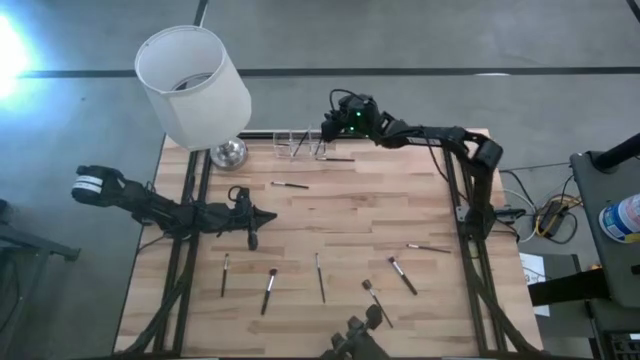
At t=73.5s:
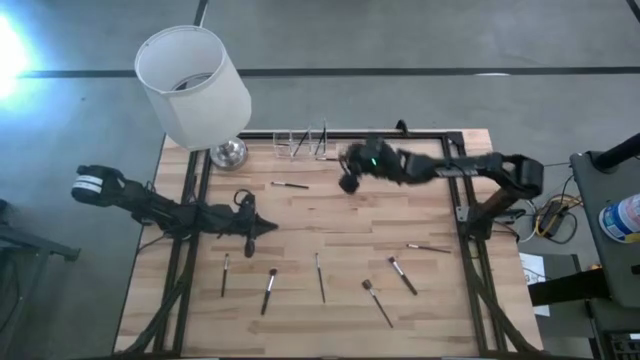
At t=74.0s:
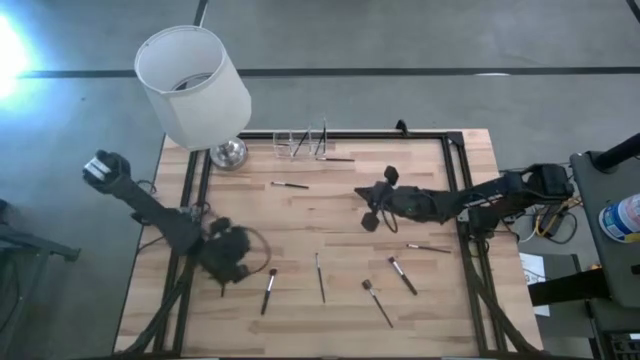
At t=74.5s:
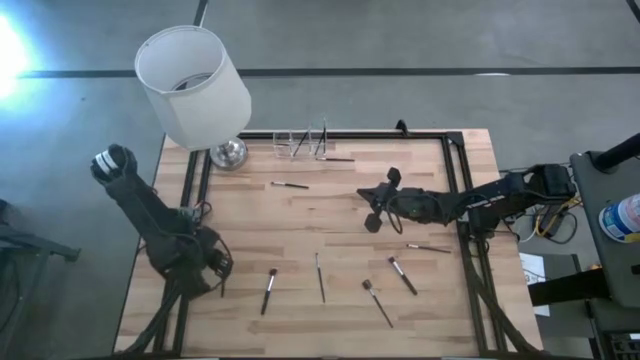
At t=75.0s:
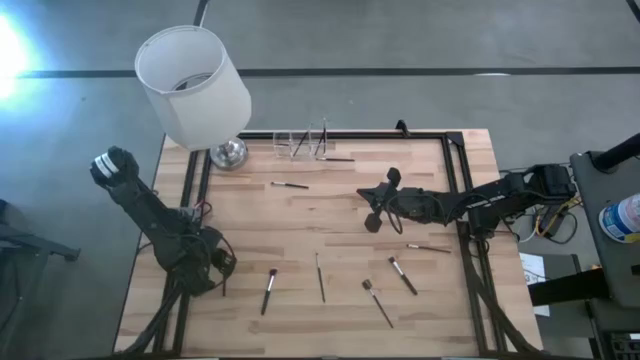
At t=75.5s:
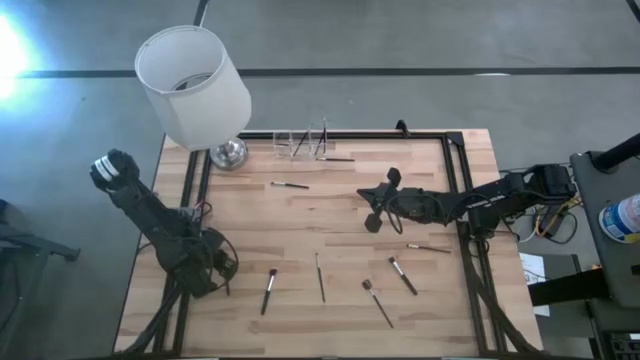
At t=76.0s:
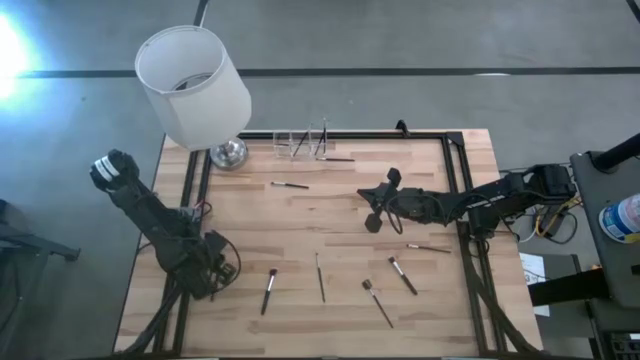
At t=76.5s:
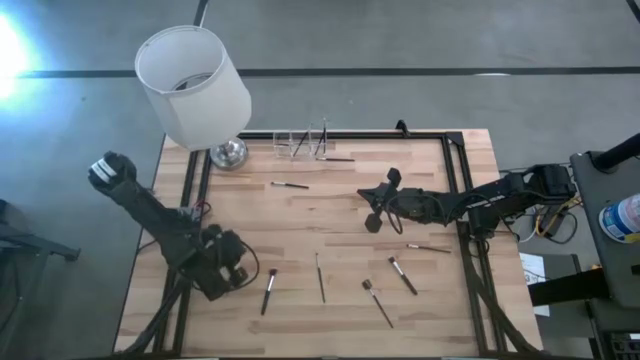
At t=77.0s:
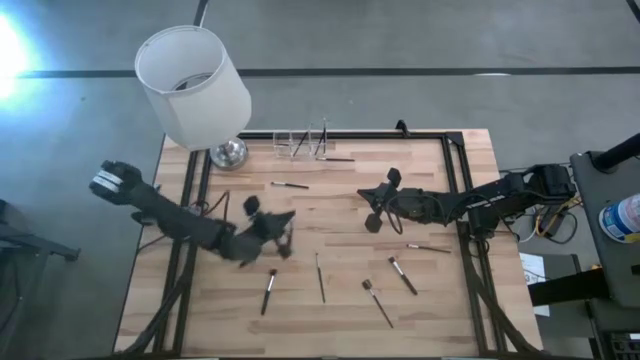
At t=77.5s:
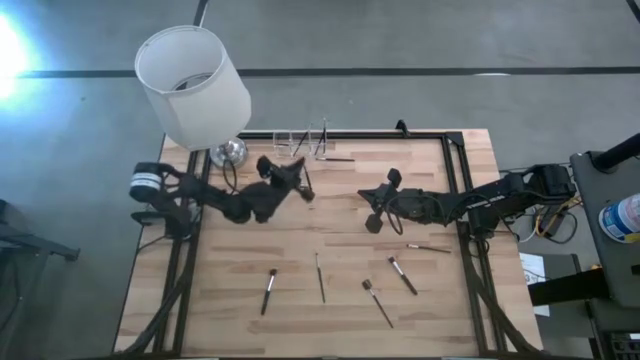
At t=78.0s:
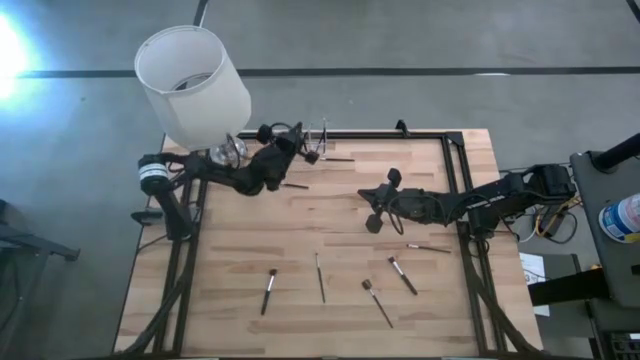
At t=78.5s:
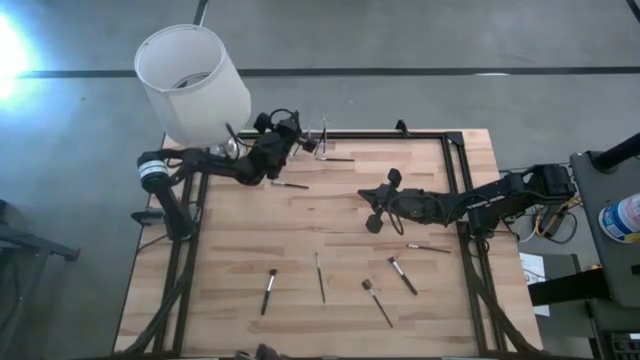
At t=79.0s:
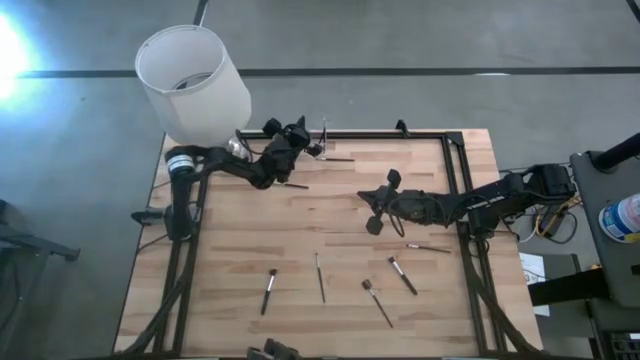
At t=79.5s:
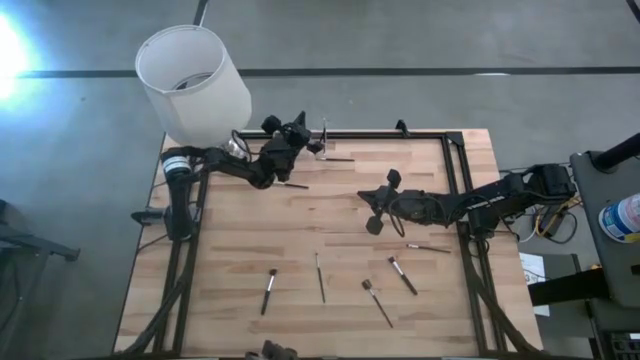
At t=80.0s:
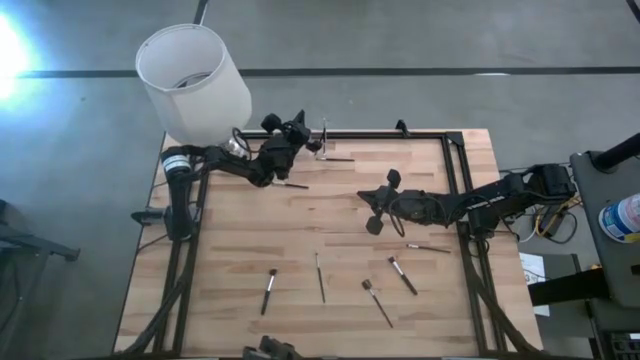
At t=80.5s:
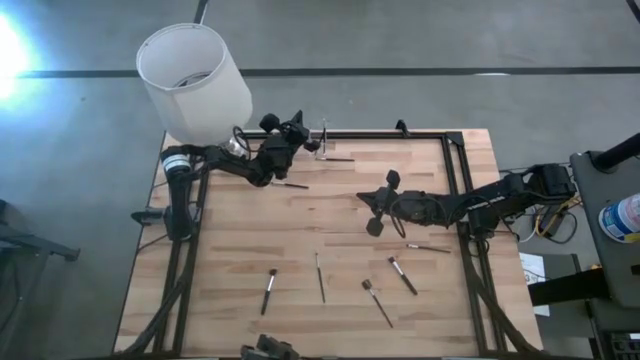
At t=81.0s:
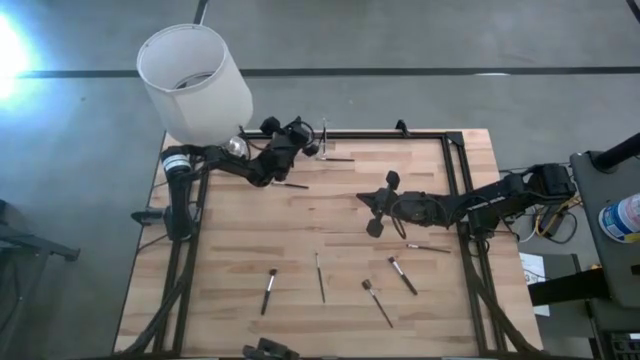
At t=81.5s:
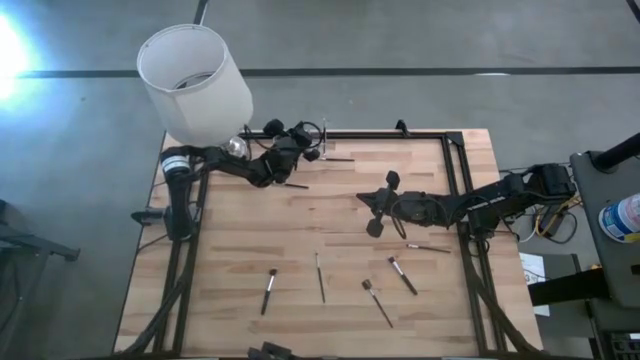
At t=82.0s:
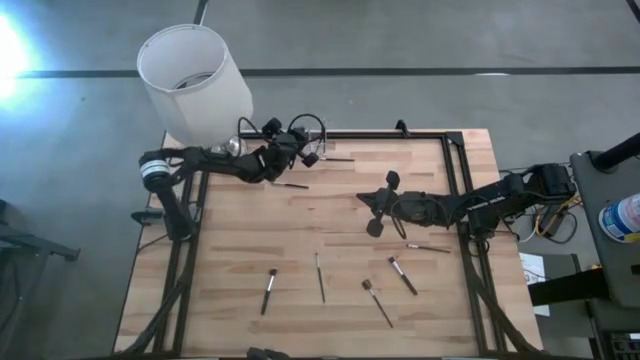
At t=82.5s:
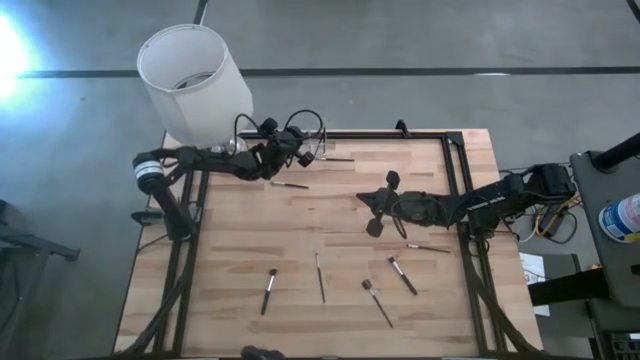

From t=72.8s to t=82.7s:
Task: Put items in baskets/containers
Put the eyeshadow brush into the transparent organizer

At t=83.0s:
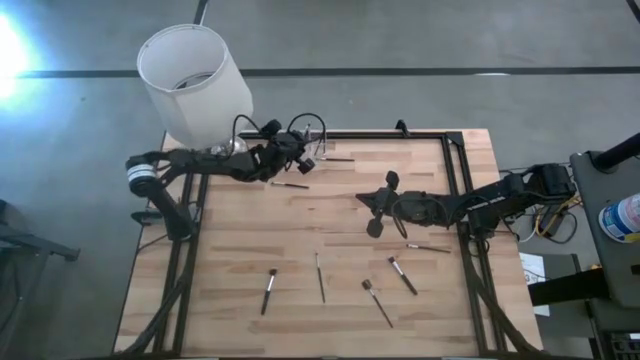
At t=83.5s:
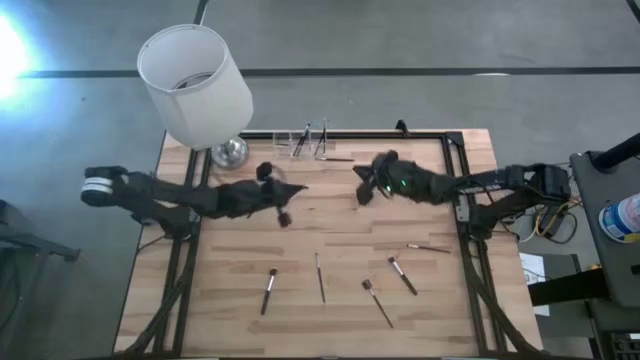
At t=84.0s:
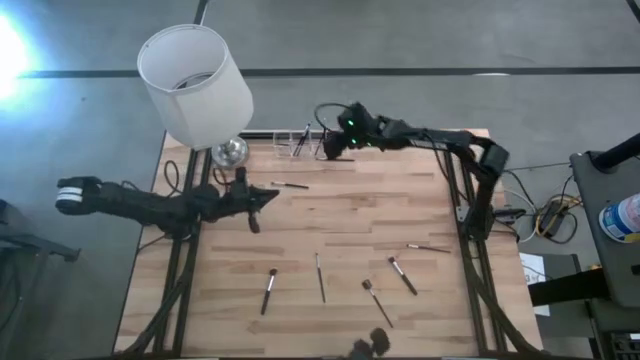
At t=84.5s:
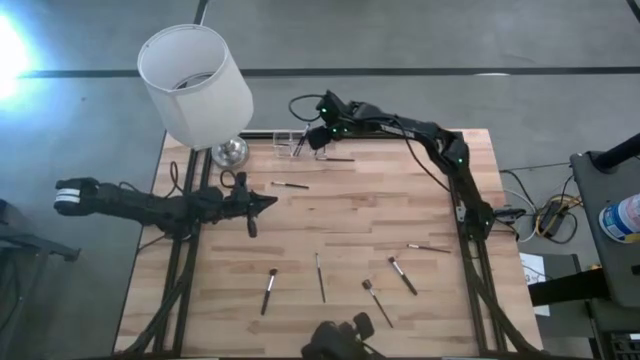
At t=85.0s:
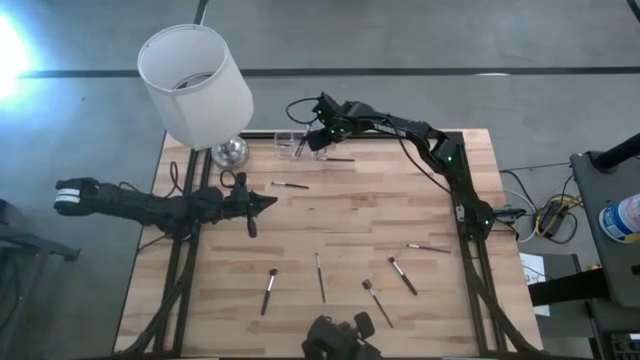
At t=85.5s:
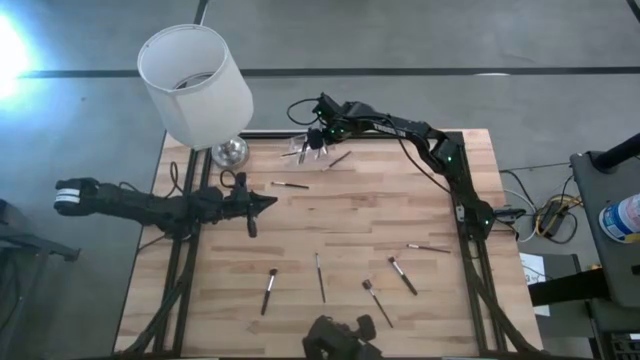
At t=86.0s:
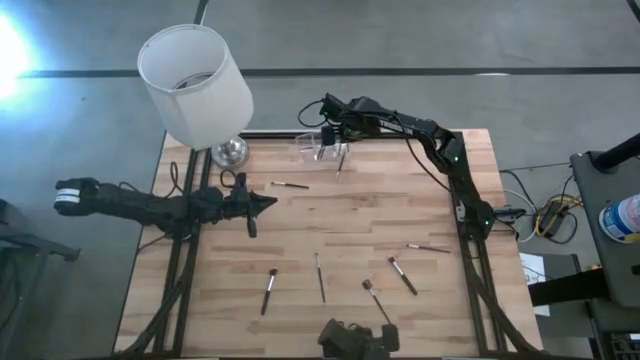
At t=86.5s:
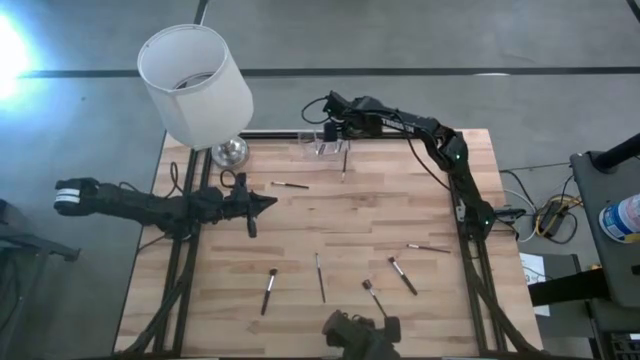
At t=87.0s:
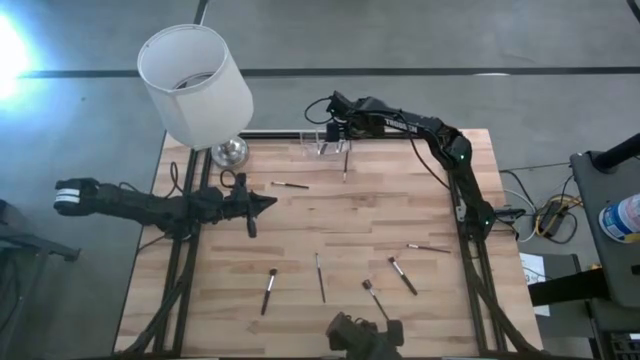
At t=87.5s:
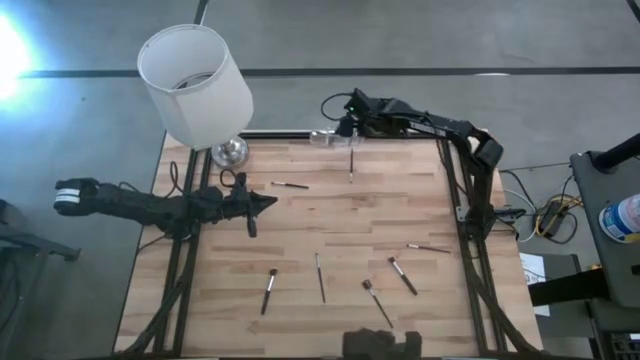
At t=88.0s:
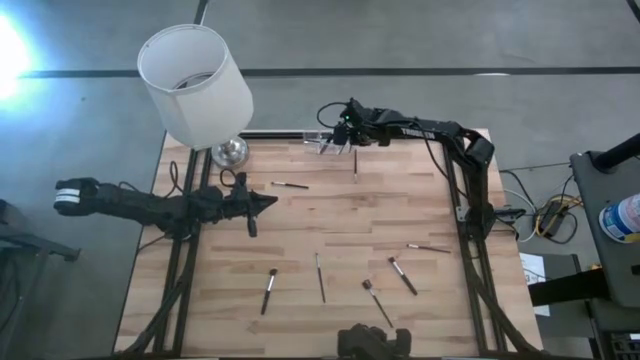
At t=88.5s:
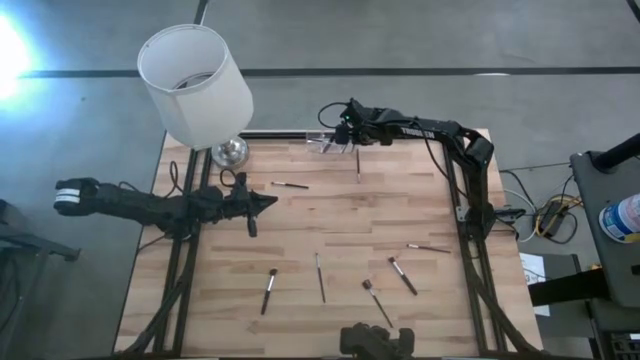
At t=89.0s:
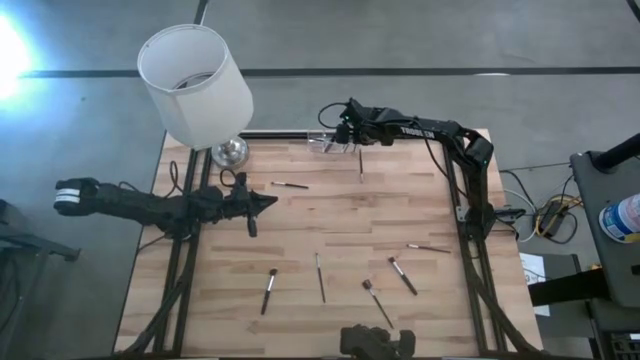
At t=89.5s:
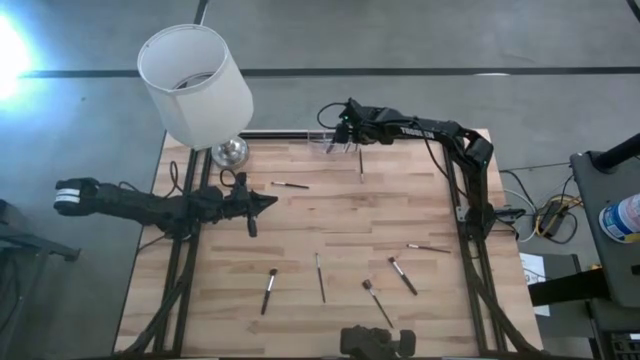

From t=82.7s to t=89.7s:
Adjust the transparent organizer

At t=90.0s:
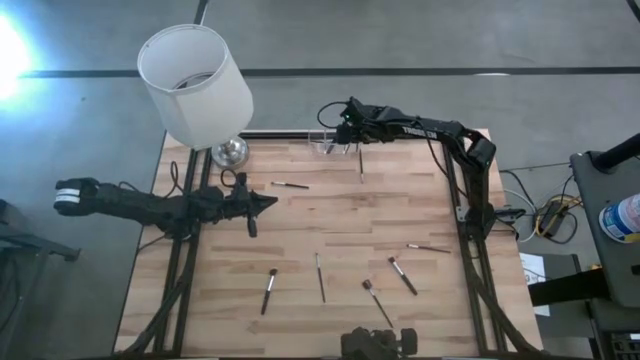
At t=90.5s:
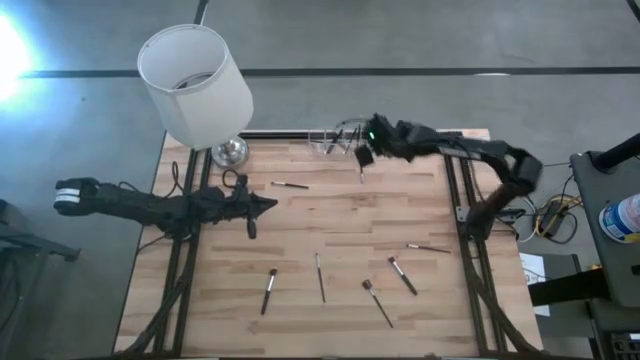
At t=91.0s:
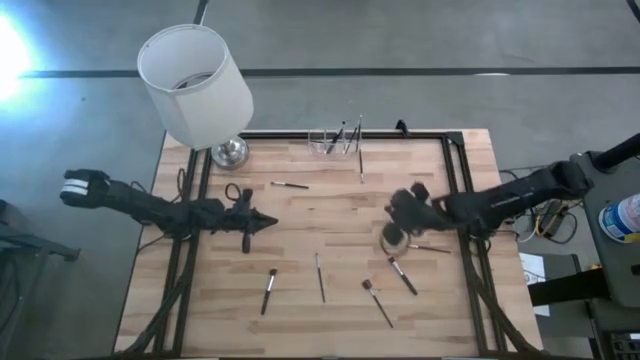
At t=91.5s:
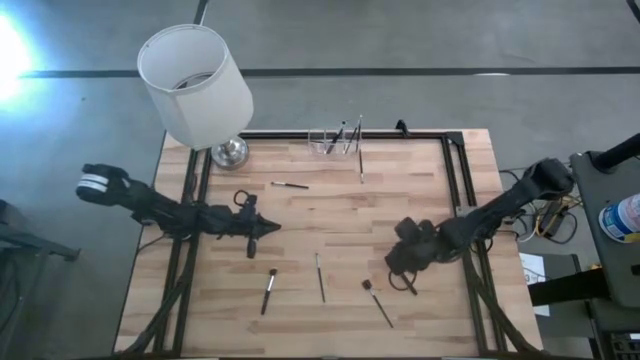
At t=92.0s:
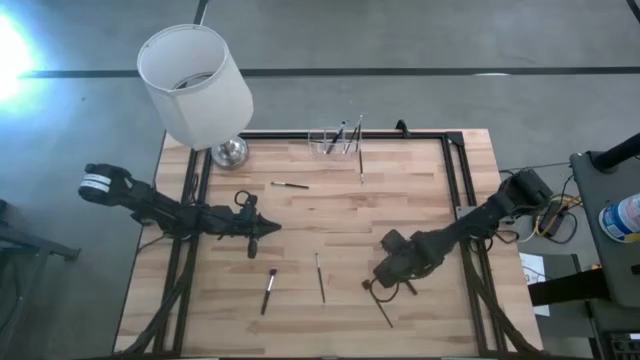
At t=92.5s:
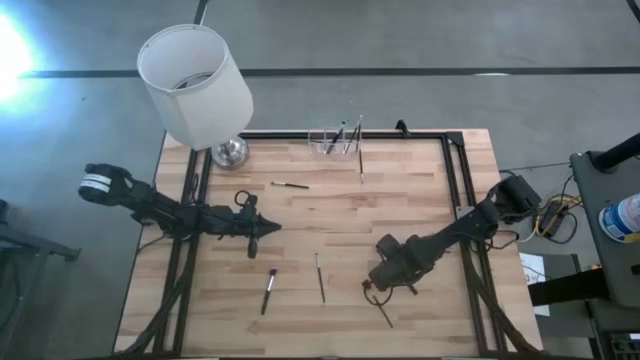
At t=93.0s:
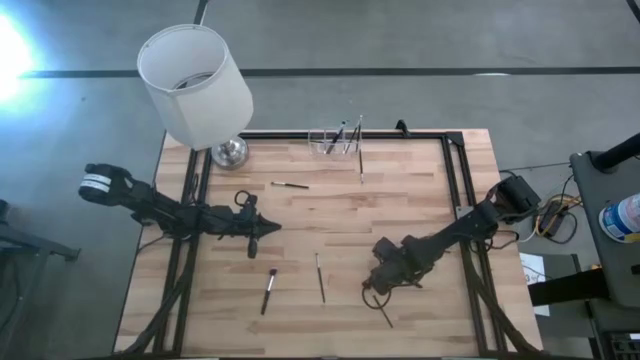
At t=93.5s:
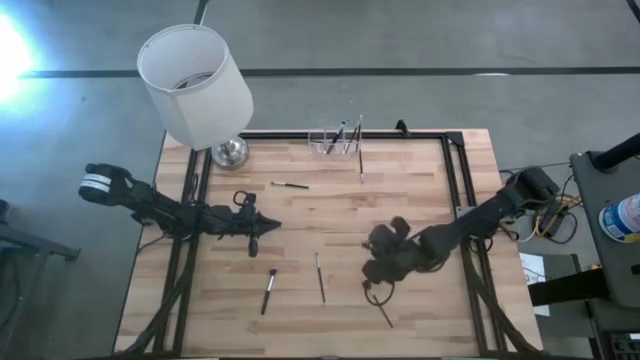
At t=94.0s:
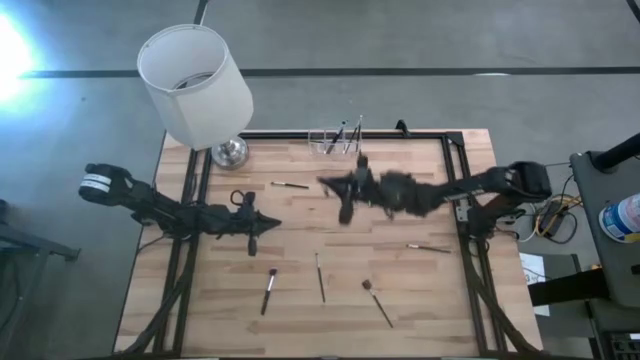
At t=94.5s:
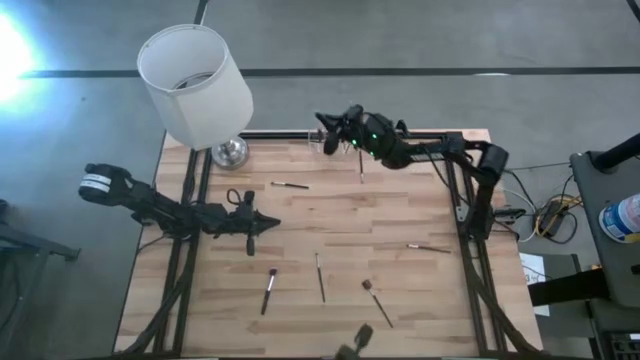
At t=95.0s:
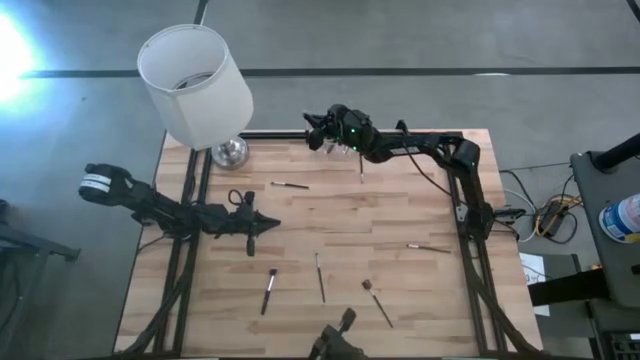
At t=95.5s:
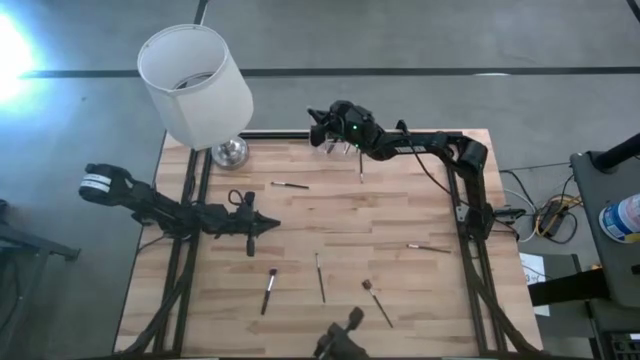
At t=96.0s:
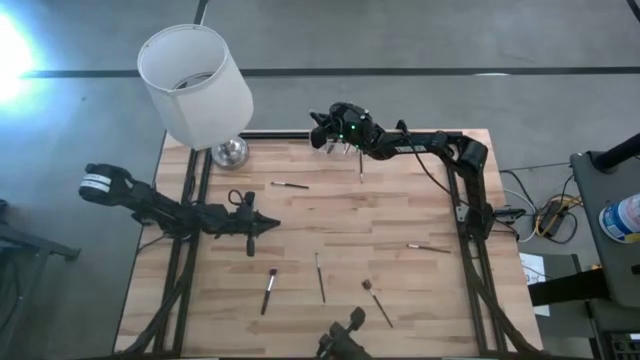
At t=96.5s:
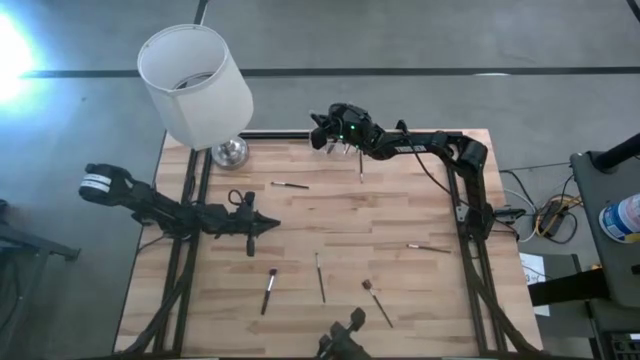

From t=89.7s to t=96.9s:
Put the blush brush into the transparent organizer
